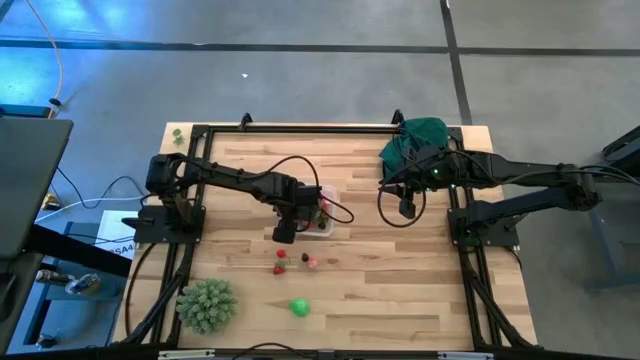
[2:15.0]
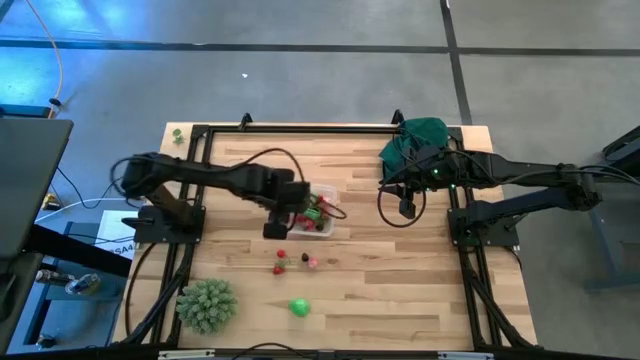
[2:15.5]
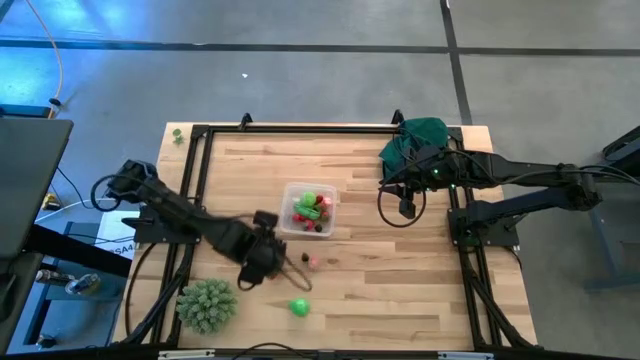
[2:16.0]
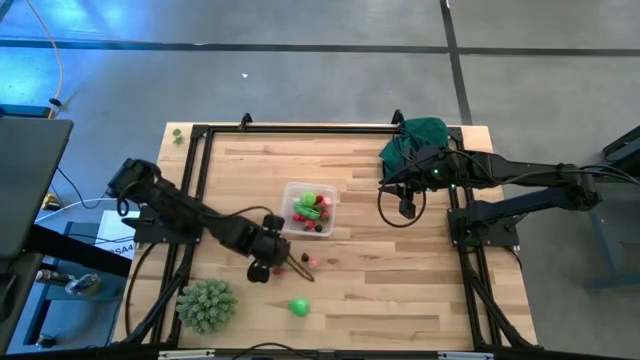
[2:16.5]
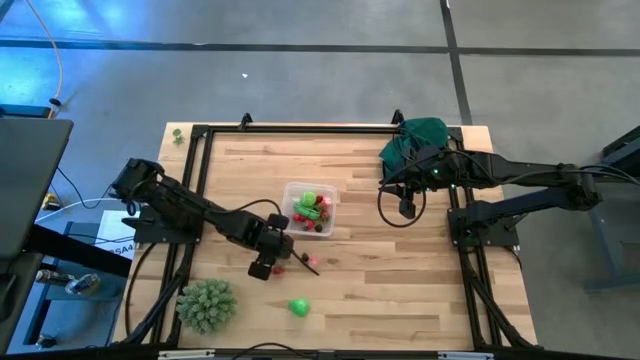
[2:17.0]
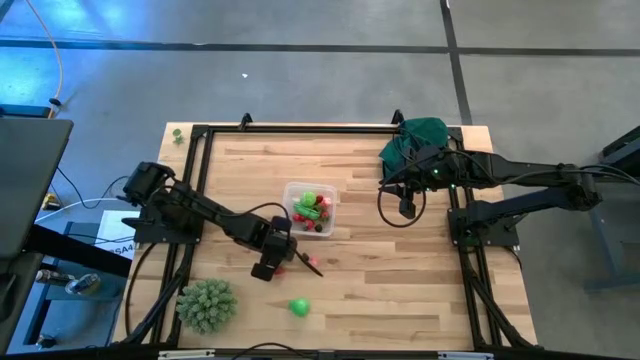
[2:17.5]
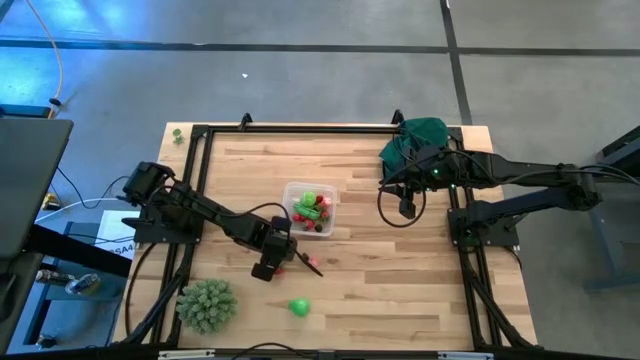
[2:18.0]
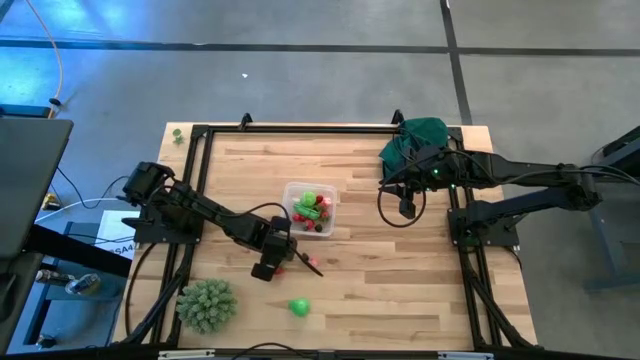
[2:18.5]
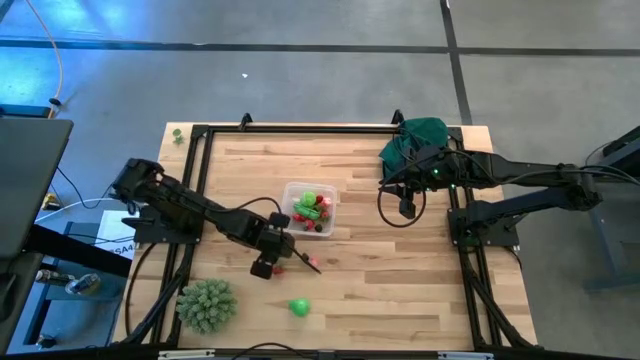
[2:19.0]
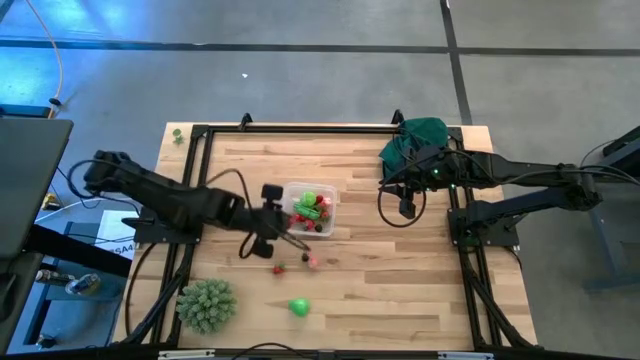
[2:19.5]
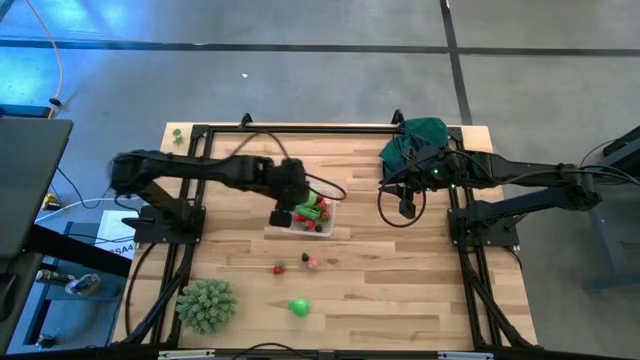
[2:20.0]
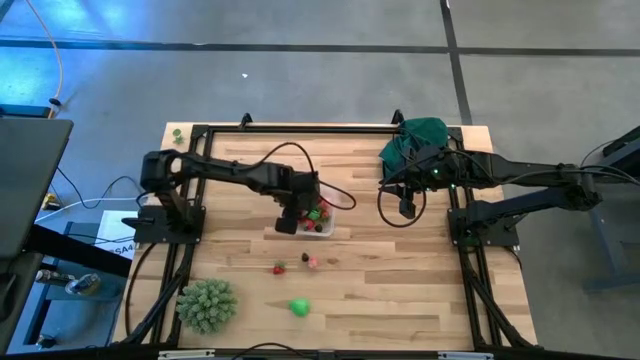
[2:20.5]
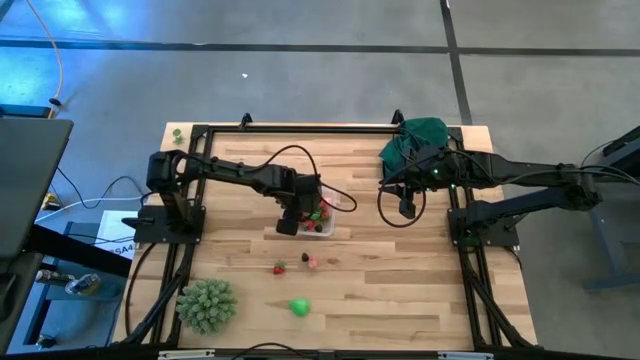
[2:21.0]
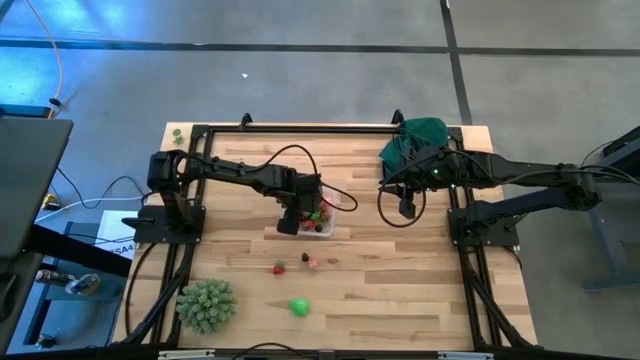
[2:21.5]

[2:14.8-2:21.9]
Task: Pick and placing Produce into tupperware
Put the red cherry into the transparent container

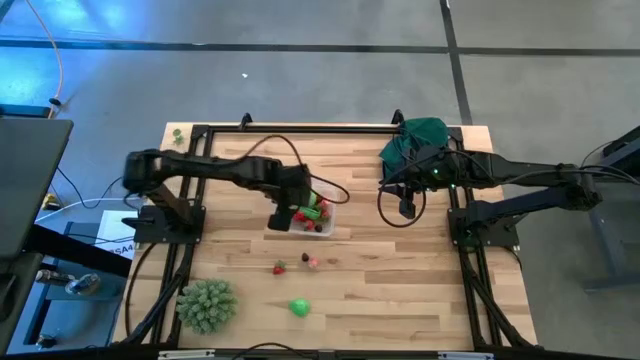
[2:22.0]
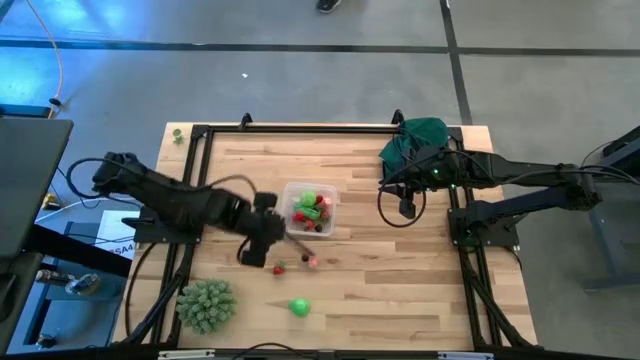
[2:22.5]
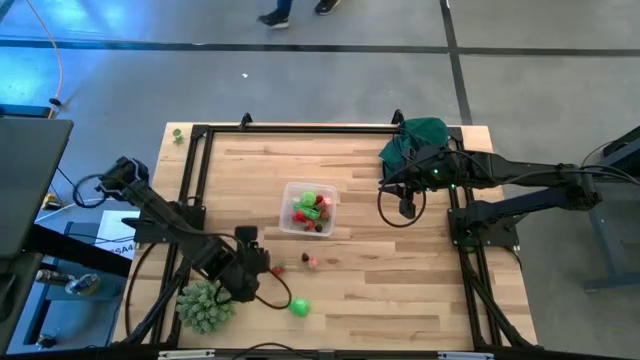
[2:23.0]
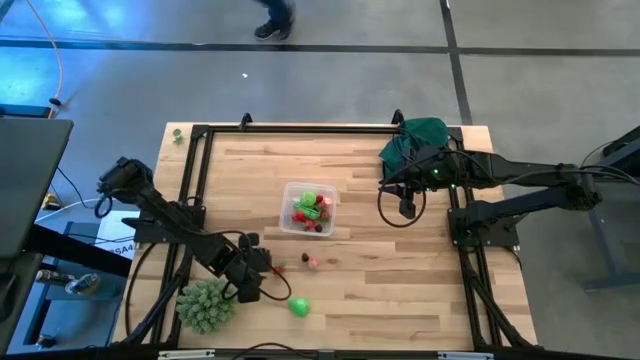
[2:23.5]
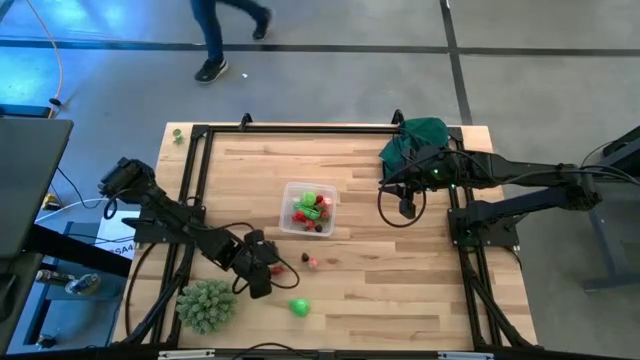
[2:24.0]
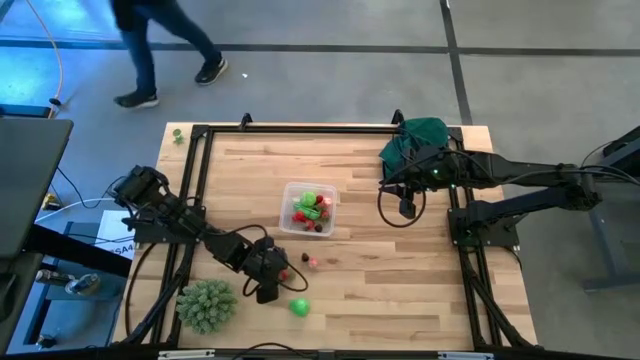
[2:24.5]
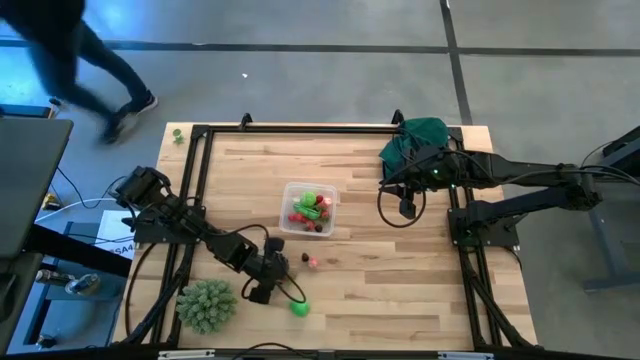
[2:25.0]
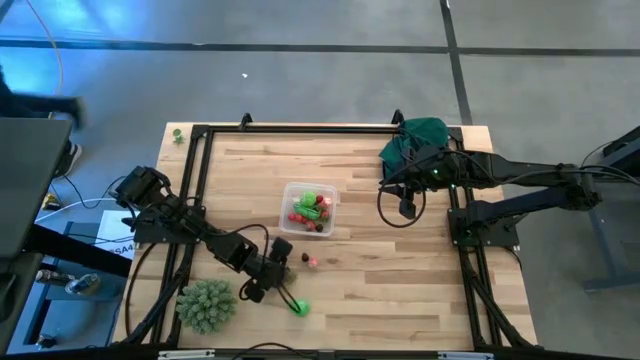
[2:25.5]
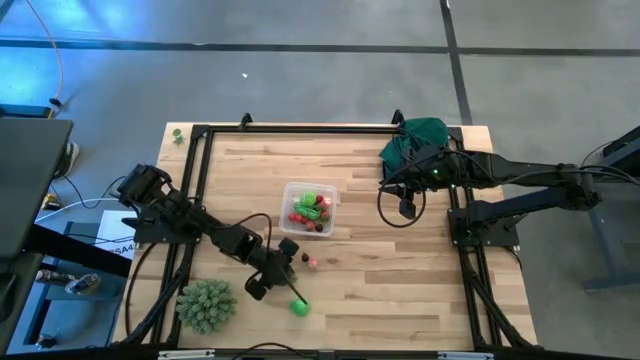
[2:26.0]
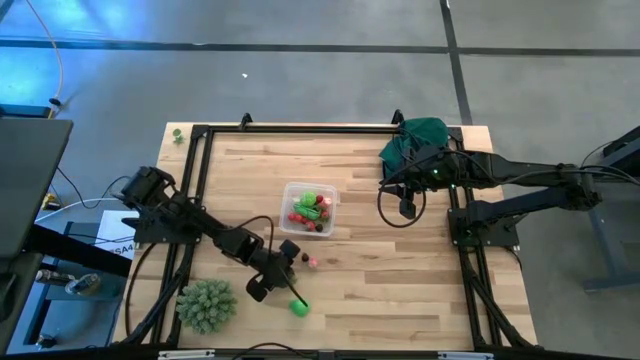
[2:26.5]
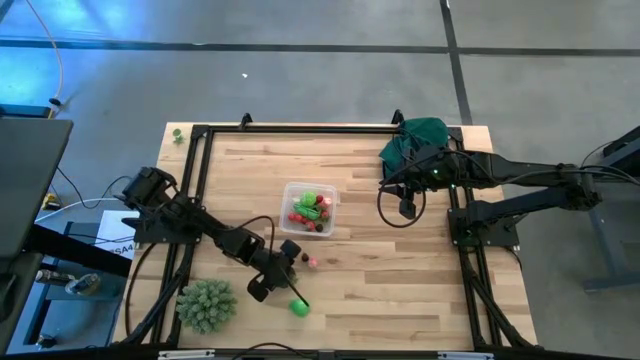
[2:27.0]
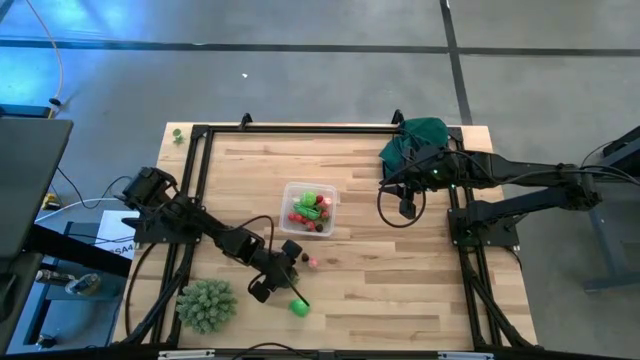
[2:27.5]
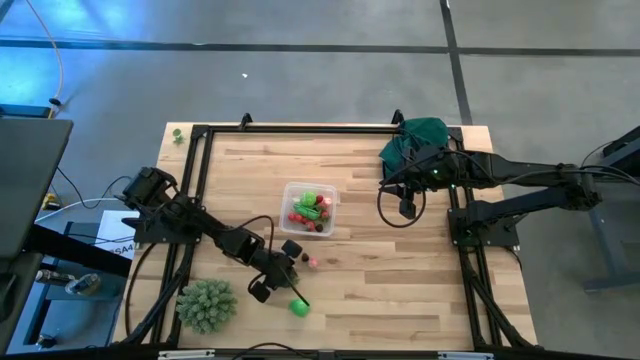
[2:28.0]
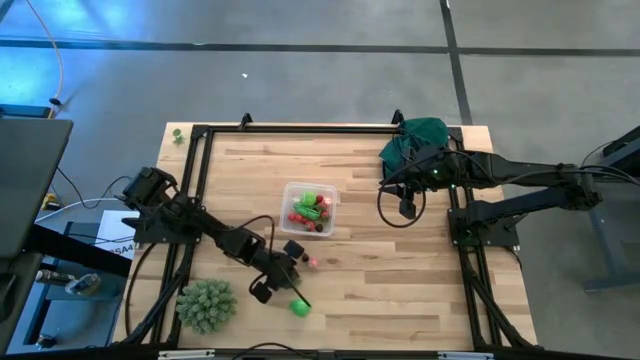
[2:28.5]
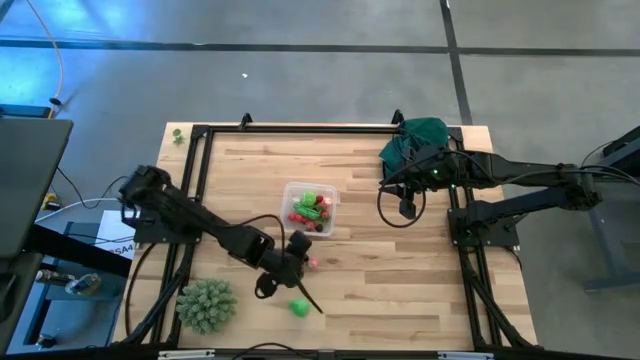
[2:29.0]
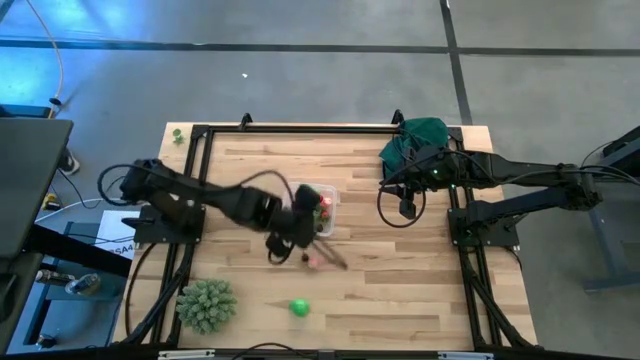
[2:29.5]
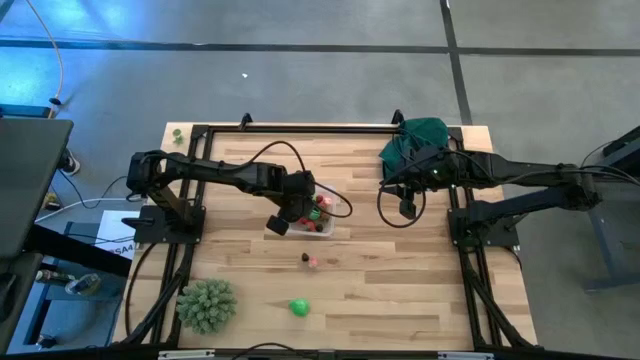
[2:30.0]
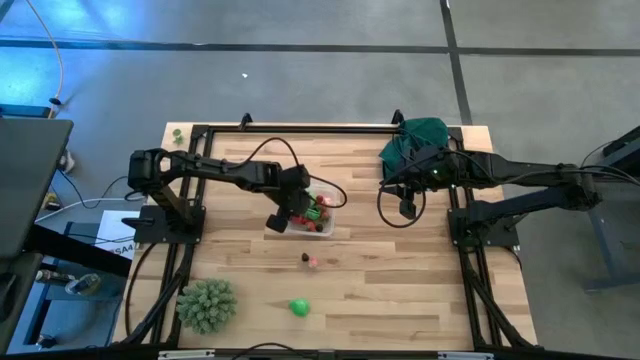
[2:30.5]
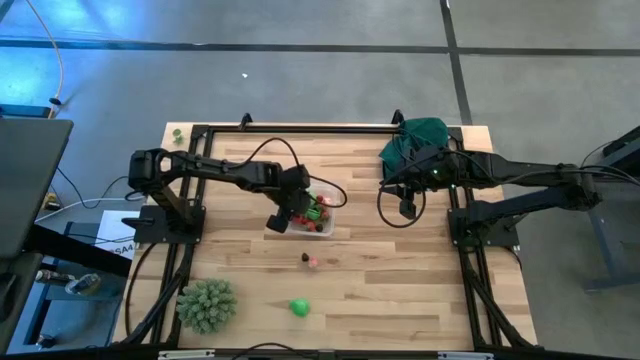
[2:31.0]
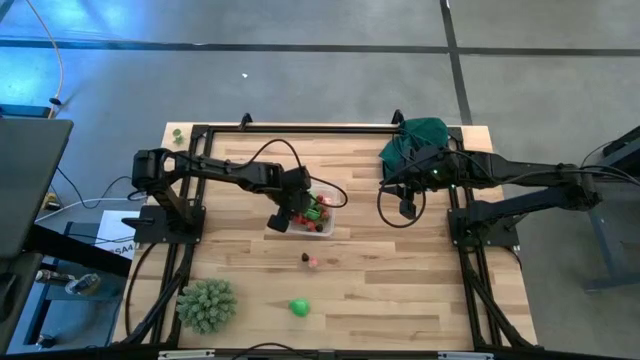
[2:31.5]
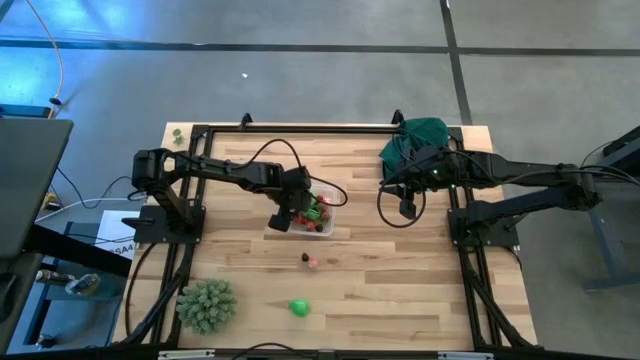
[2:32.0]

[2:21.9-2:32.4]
Put the red strawberry into the transparent container

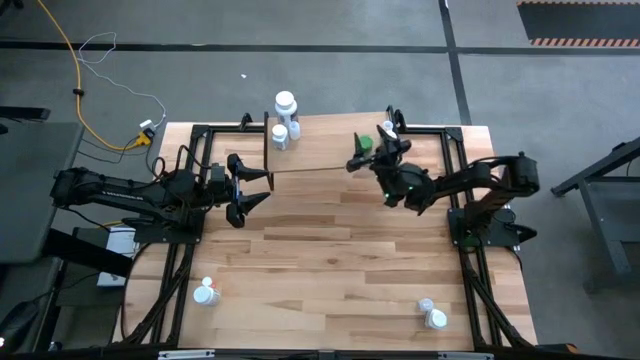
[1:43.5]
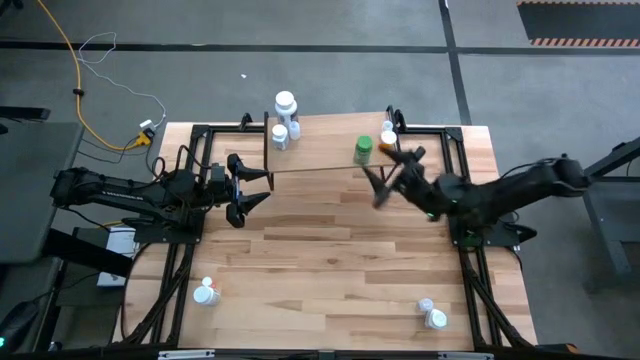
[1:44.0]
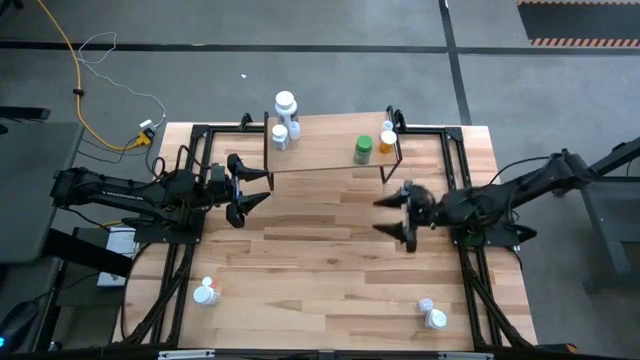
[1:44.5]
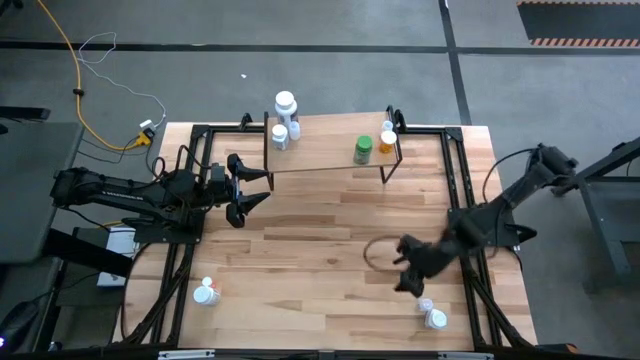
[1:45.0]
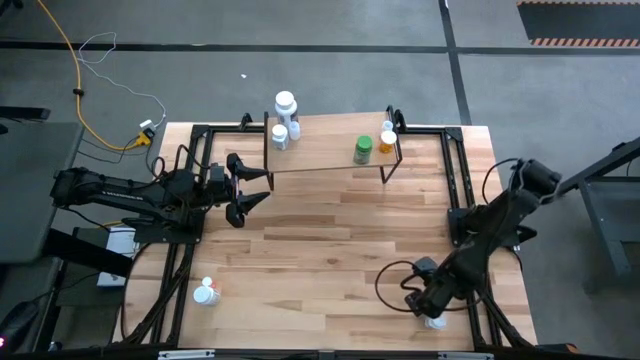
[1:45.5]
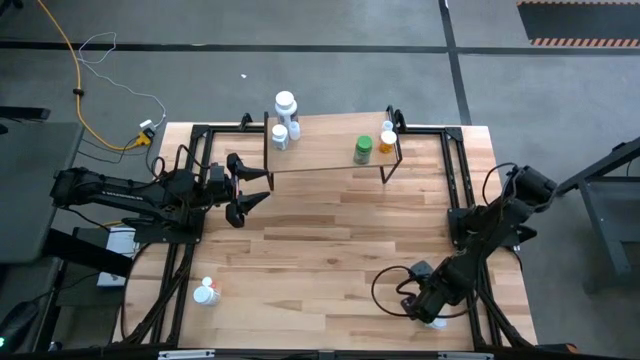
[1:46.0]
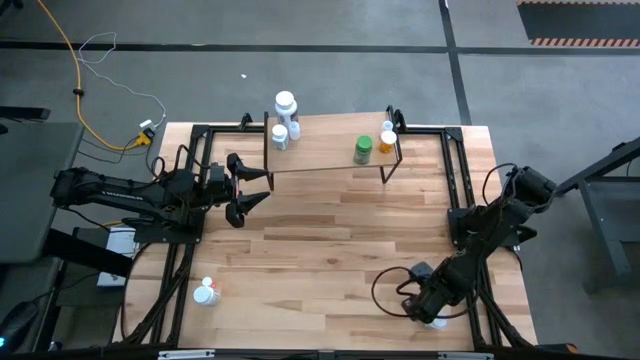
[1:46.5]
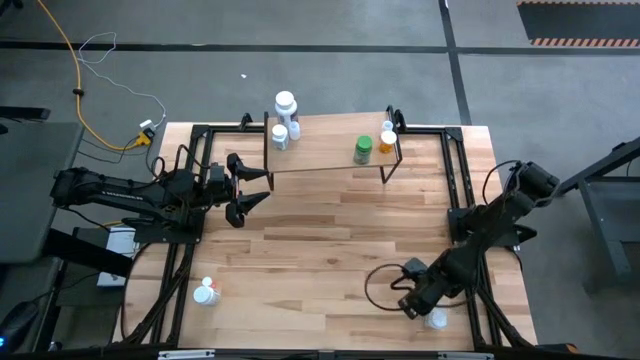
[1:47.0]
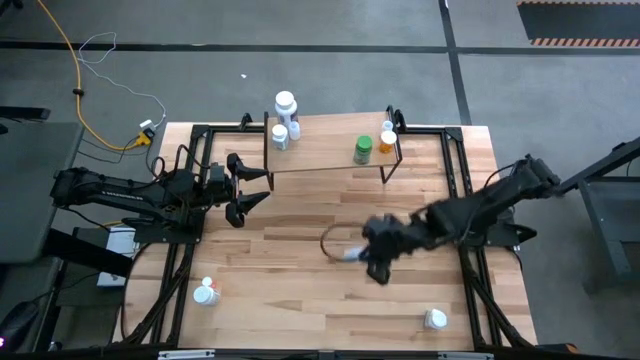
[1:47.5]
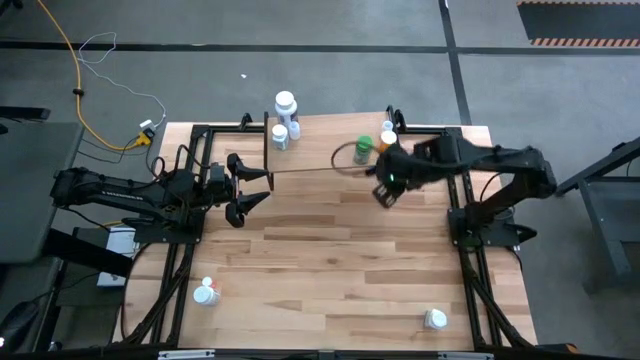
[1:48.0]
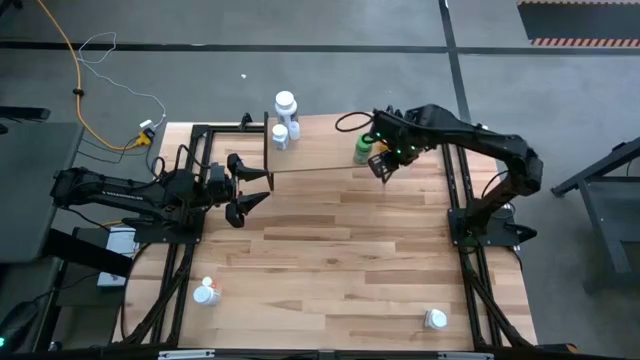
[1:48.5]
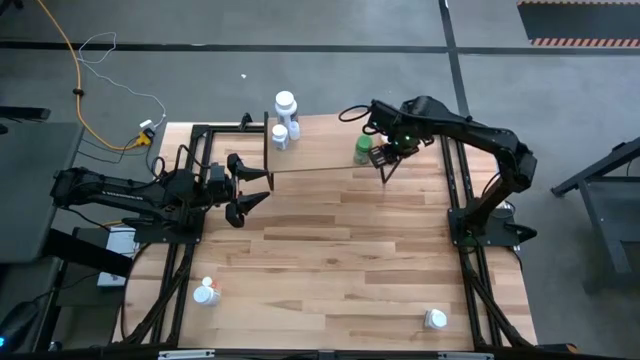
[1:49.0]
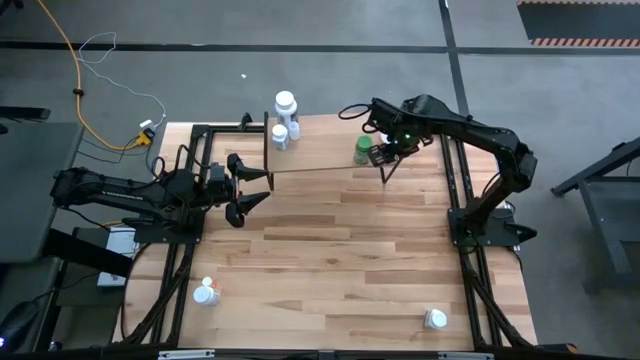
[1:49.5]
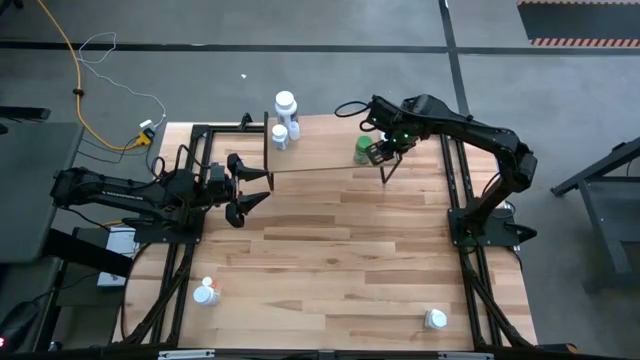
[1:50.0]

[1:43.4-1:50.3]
Task: Pick and place medicine bottles onto shelf by color
Put the white pill bottle on the shelf
